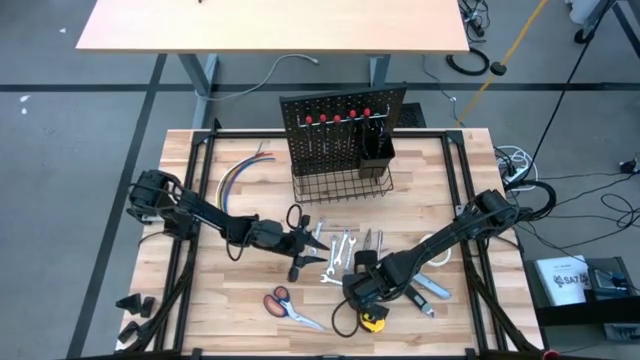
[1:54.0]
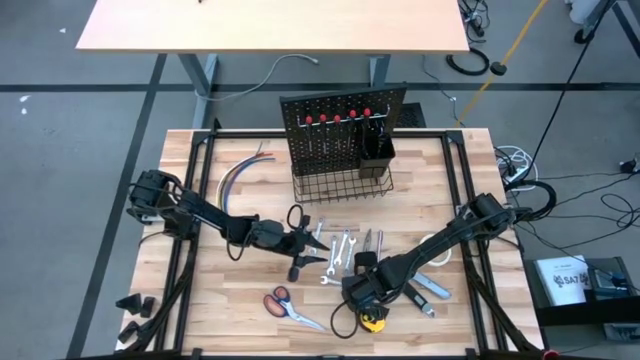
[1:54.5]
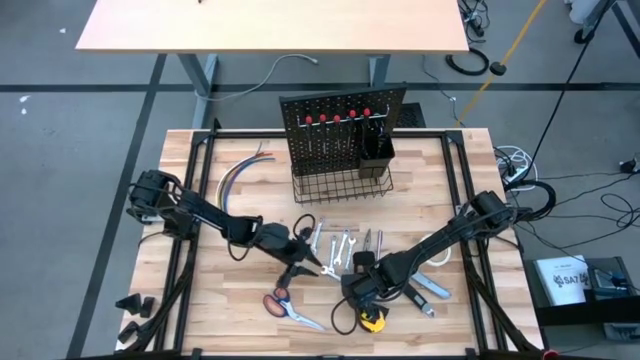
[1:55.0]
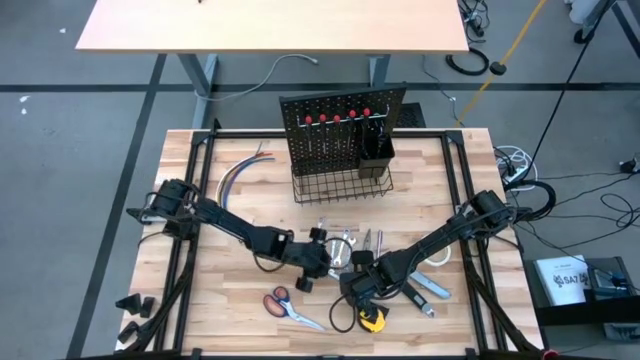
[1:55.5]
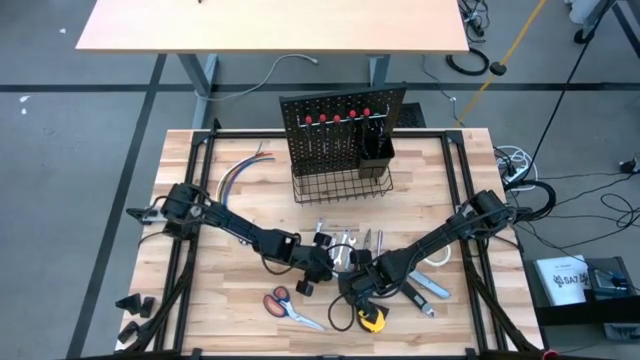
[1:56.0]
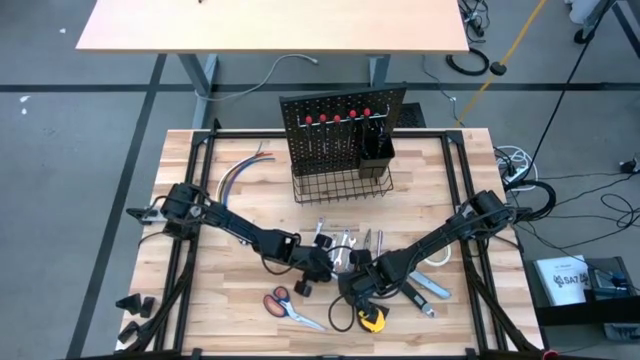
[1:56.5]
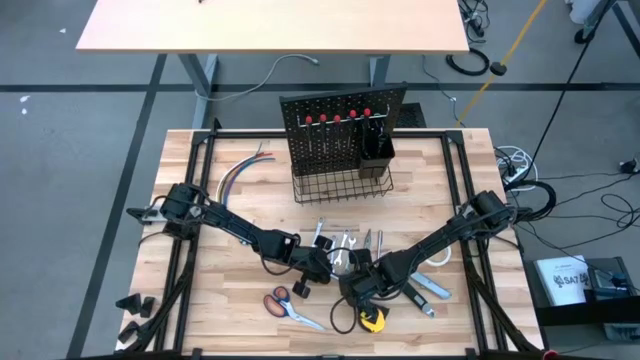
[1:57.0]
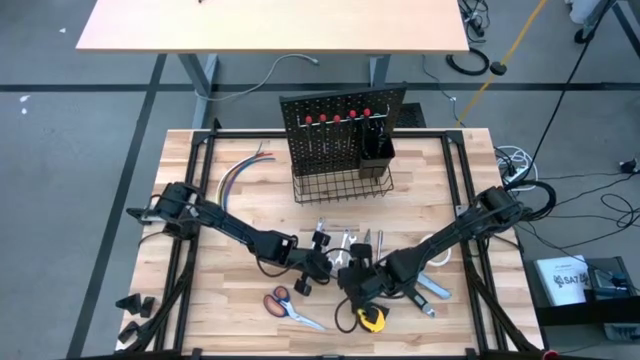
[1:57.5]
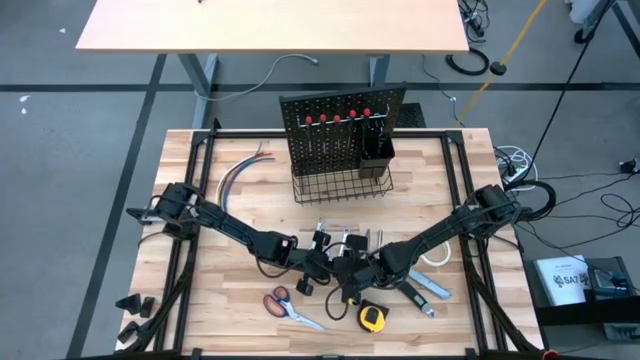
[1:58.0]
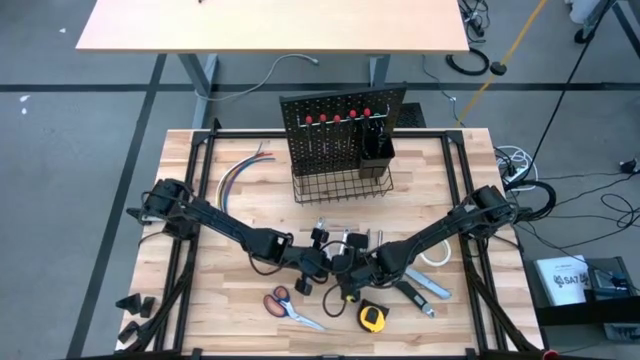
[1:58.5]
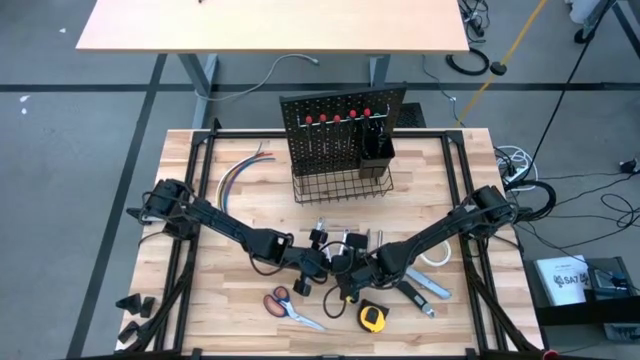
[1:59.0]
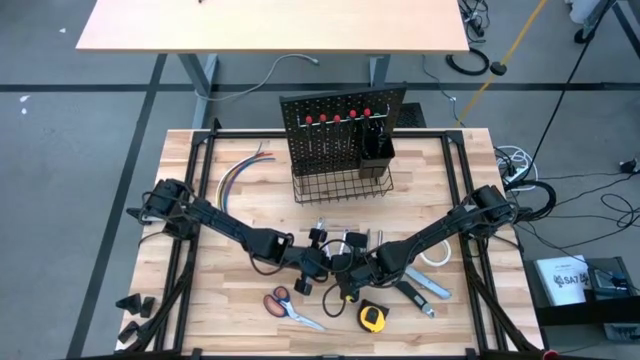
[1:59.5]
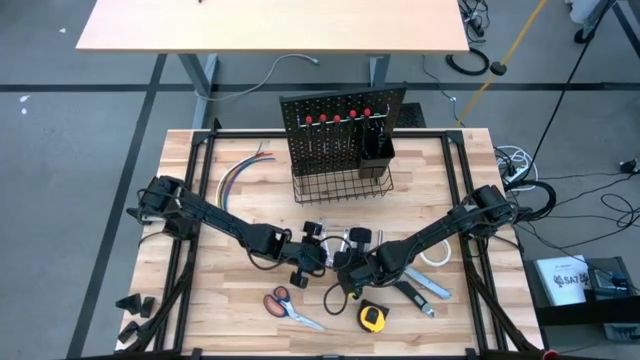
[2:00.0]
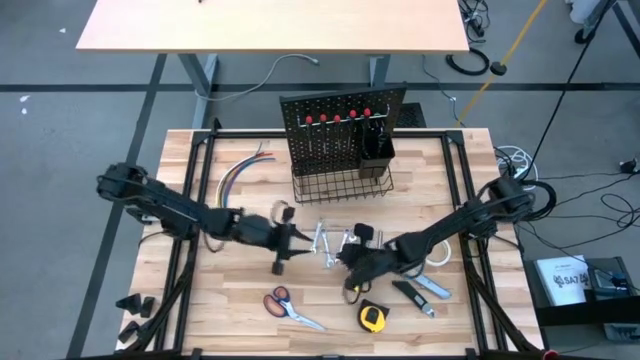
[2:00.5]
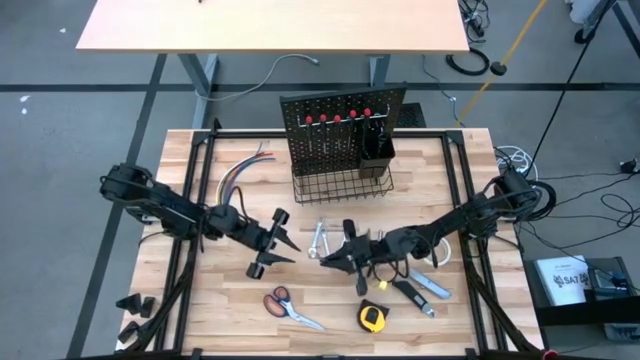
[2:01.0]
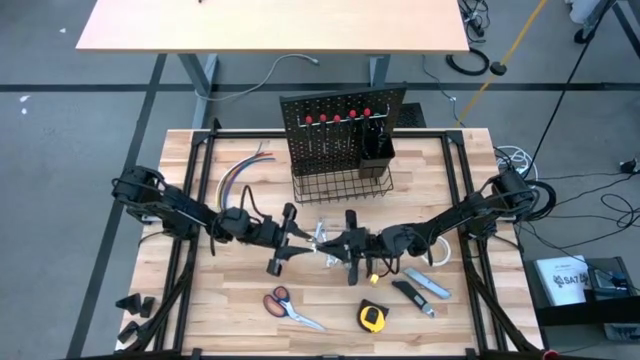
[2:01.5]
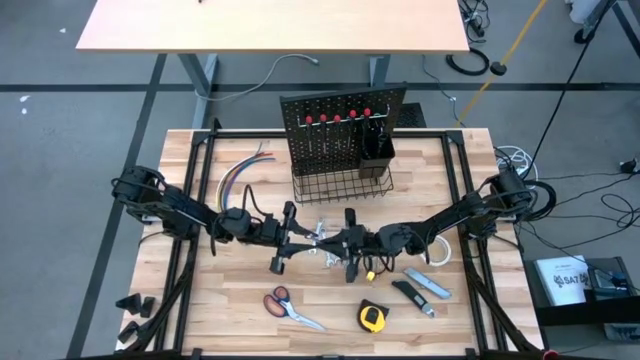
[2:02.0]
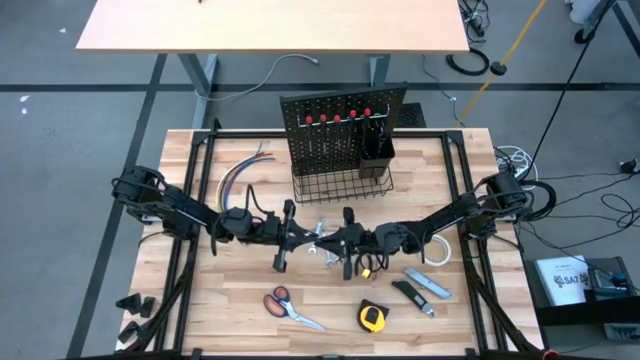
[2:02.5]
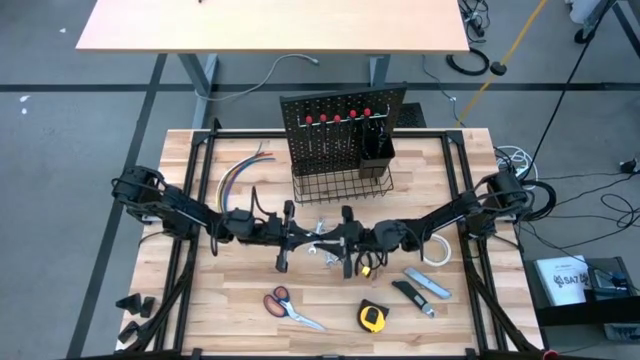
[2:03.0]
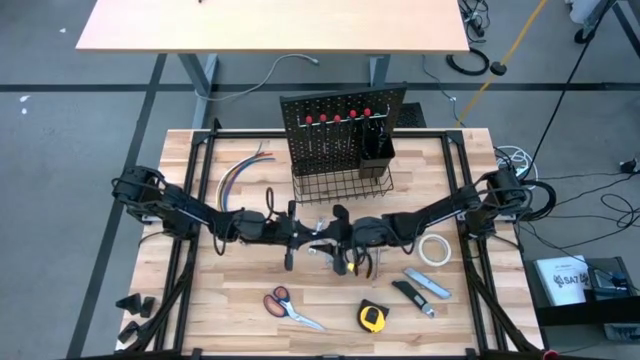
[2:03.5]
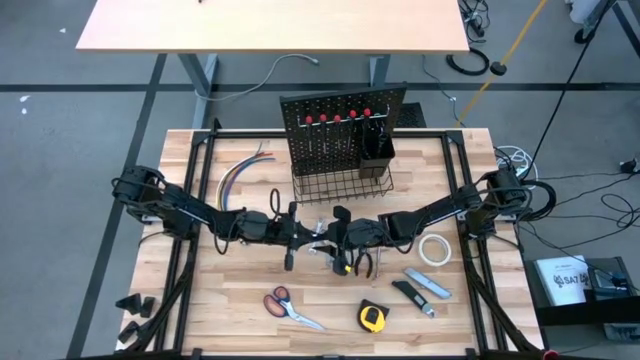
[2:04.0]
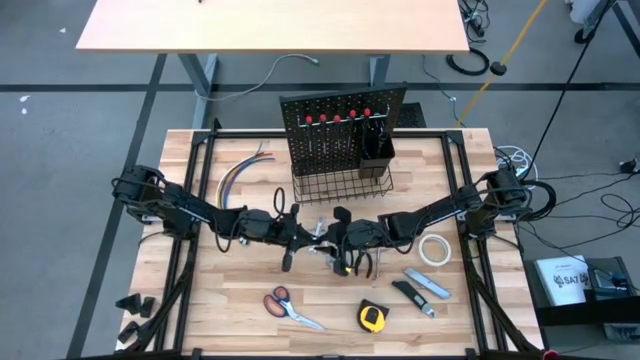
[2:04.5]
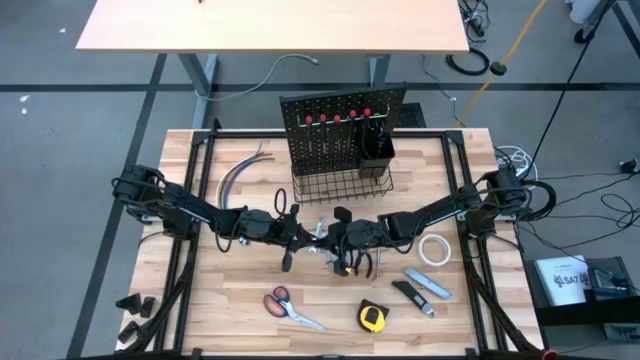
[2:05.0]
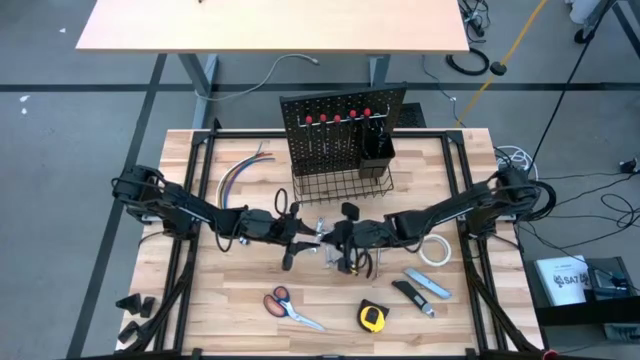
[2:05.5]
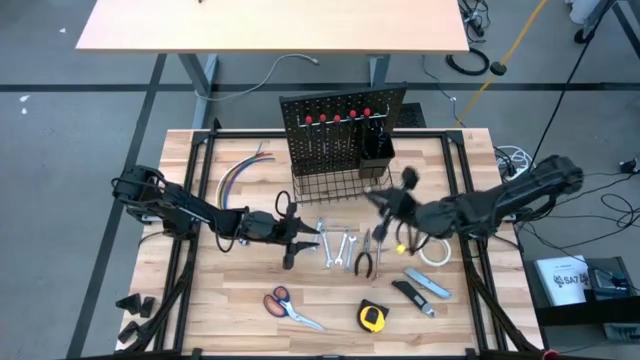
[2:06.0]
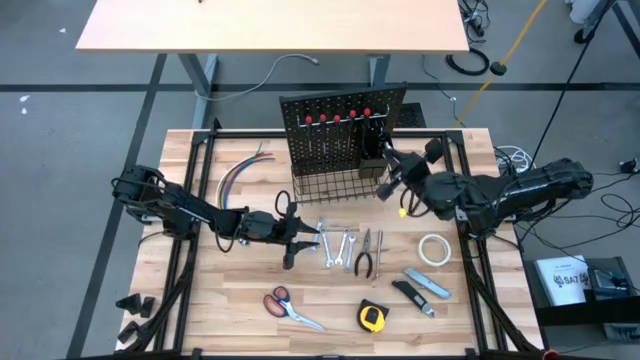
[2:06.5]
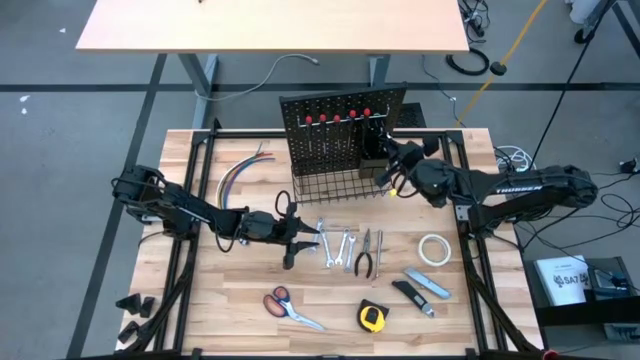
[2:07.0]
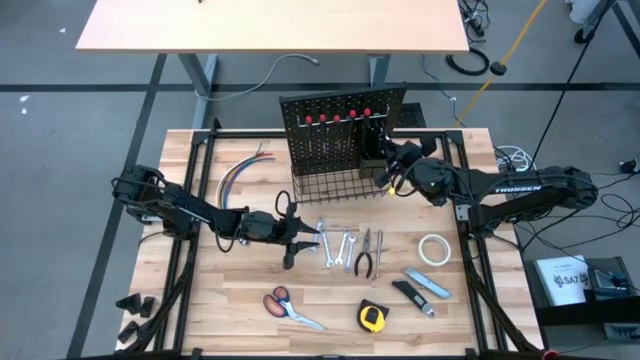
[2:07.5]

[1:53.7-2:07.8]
Task: Hang tools onto peg board
Put the wrench into the black bin on the pegboard

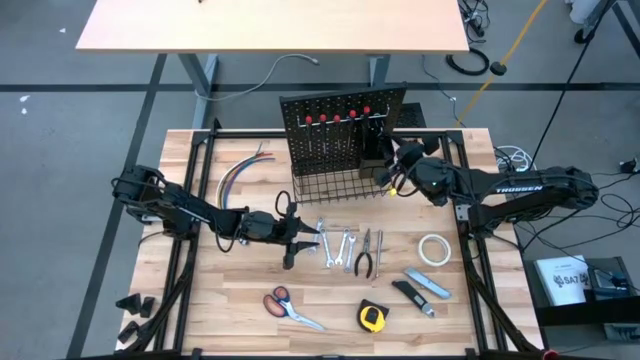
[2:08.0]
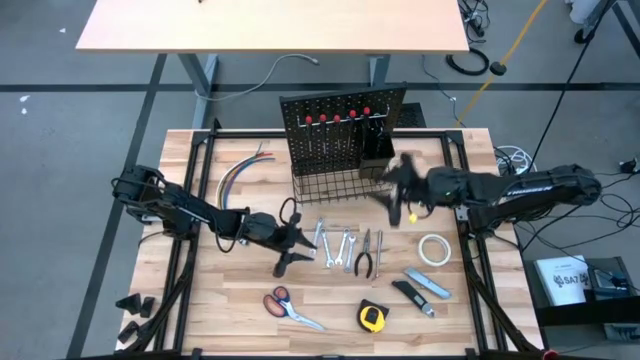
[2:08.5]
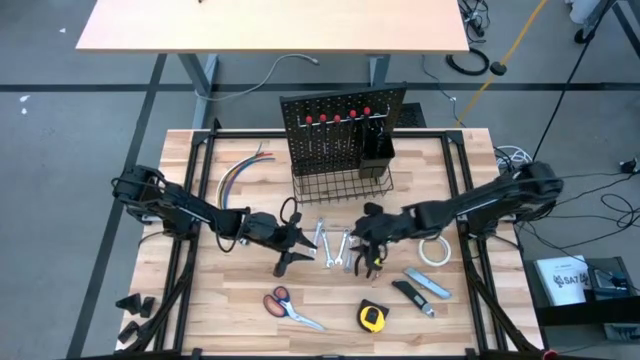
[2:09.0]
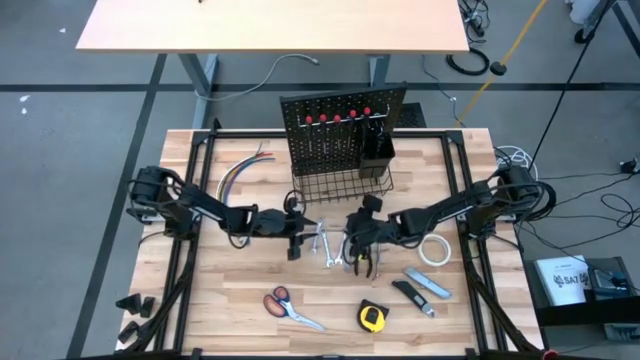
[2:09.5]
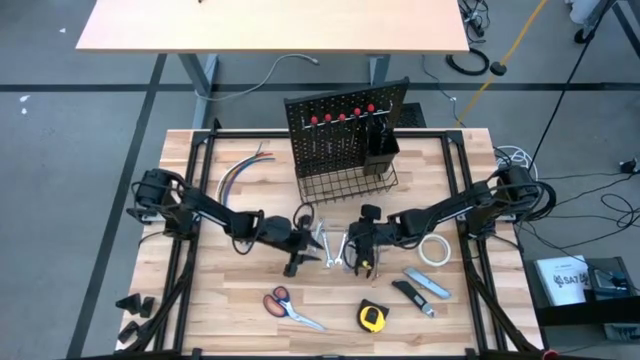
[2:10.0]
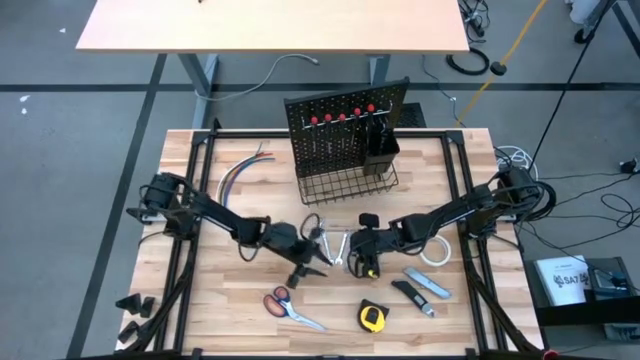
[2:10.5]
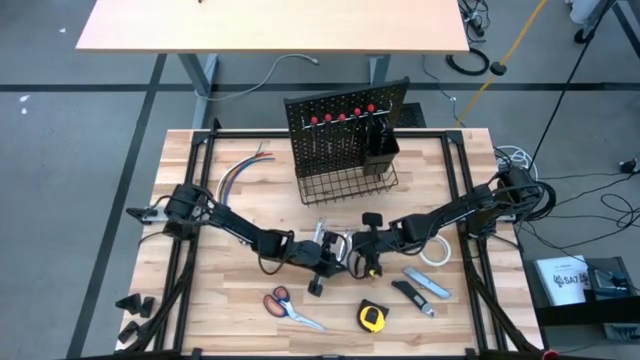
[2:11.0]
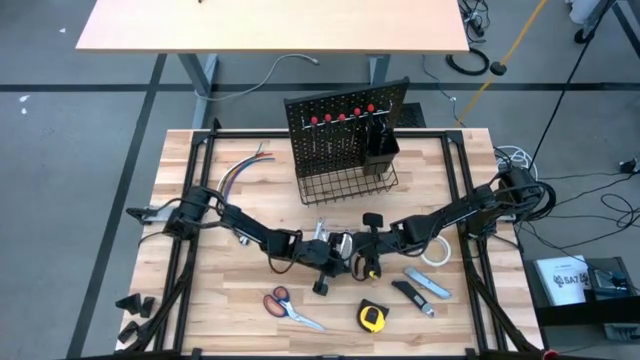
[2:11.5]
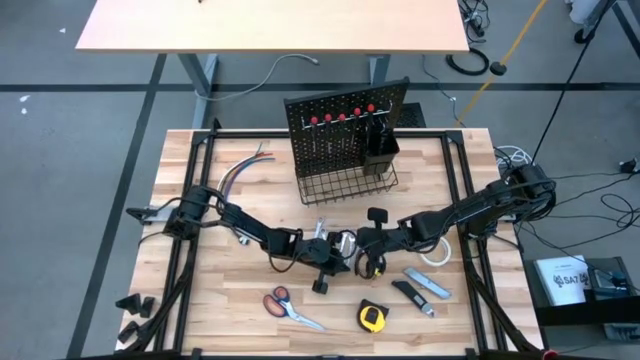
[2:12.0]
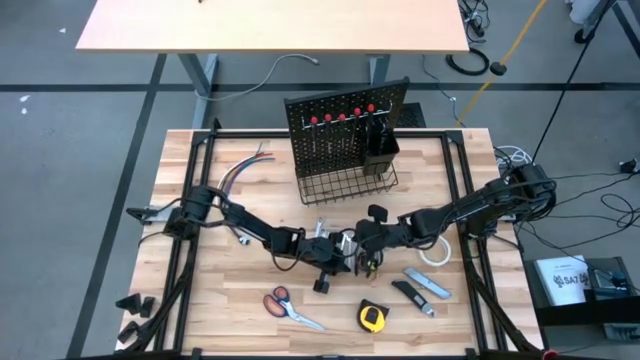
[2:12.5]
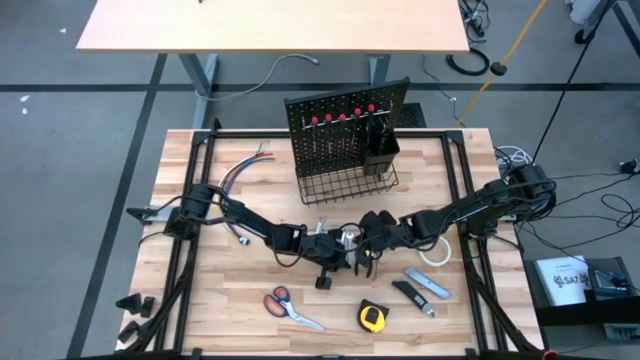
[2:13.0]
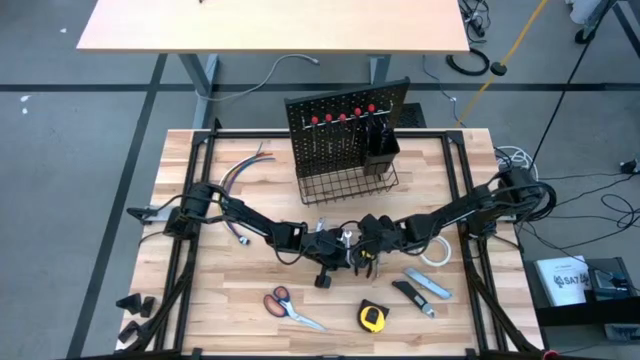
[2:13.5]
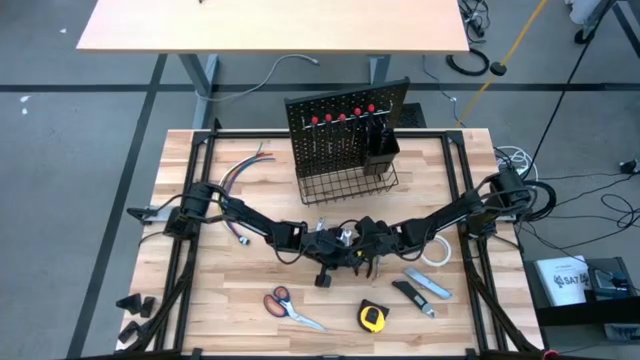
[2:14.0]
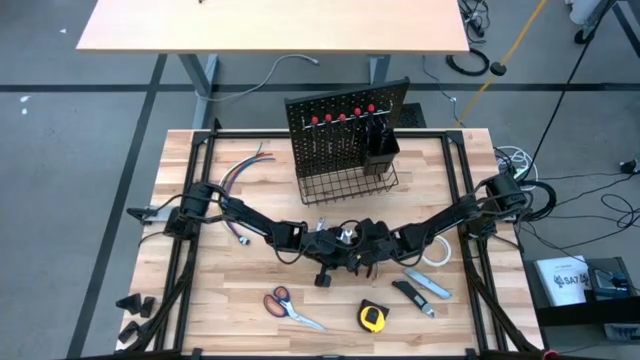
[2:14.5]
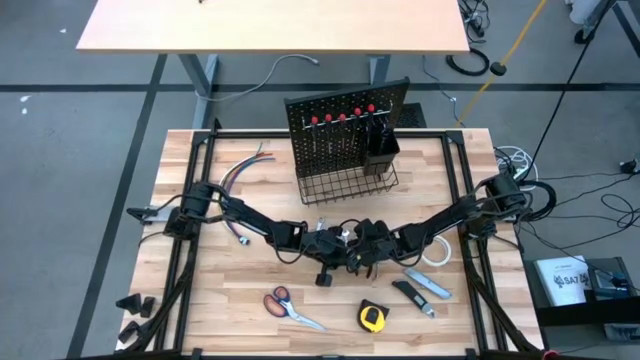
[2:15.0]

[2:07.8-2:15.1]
Put the wrench into the black bin on the pegboard
